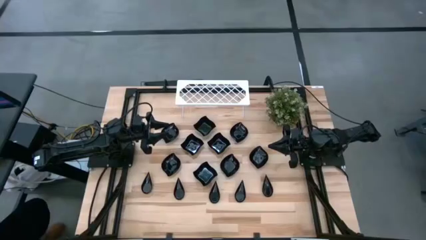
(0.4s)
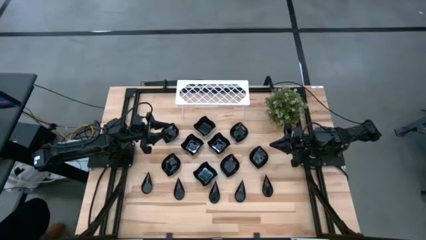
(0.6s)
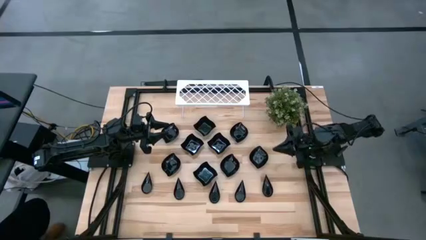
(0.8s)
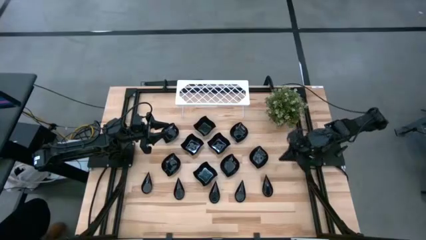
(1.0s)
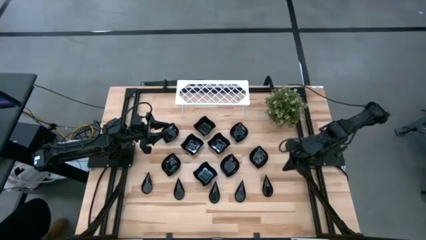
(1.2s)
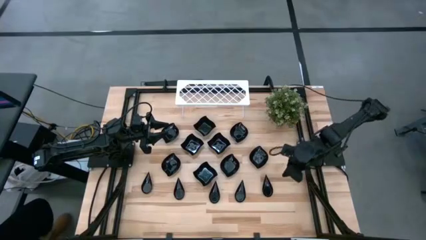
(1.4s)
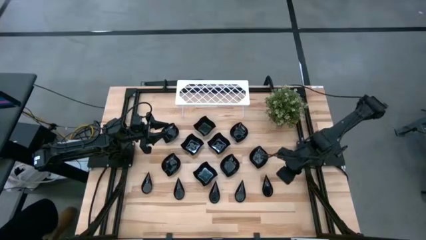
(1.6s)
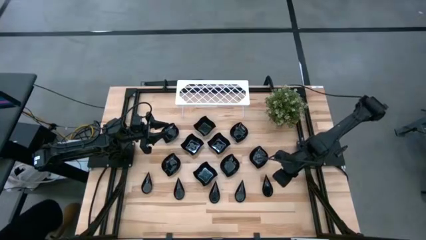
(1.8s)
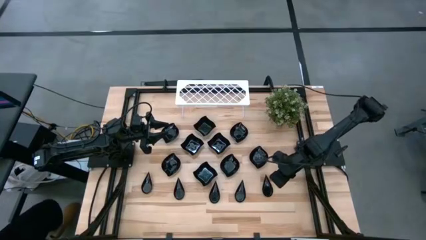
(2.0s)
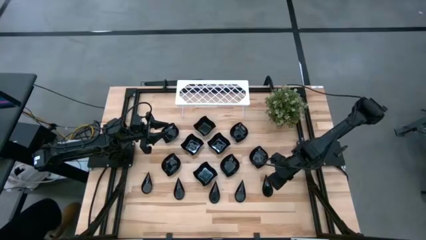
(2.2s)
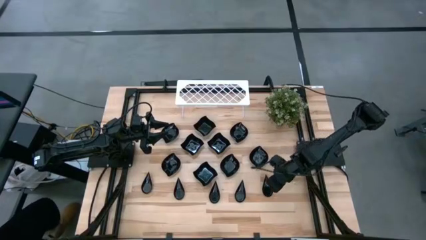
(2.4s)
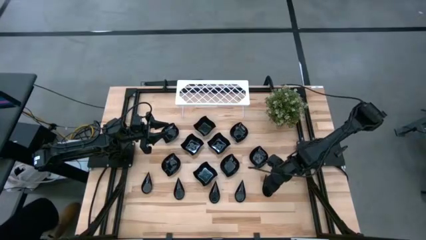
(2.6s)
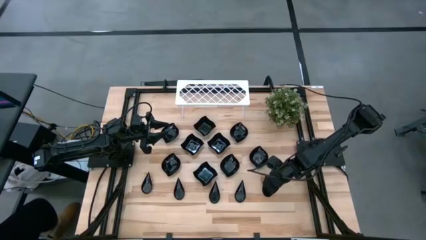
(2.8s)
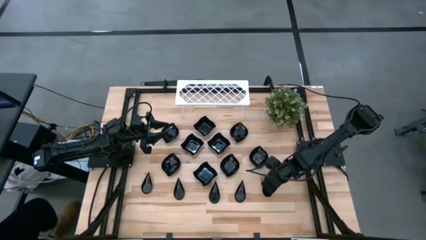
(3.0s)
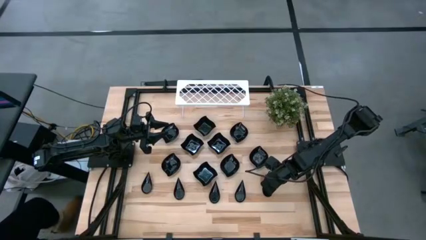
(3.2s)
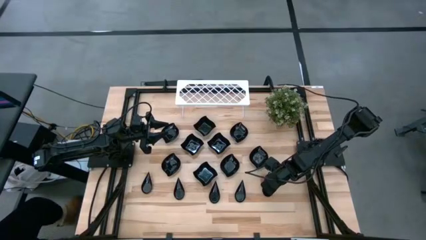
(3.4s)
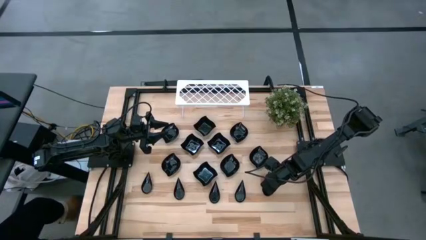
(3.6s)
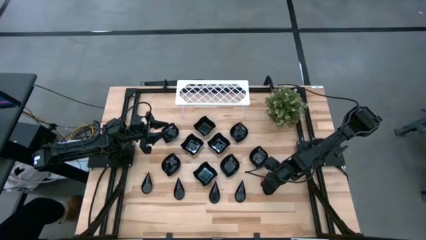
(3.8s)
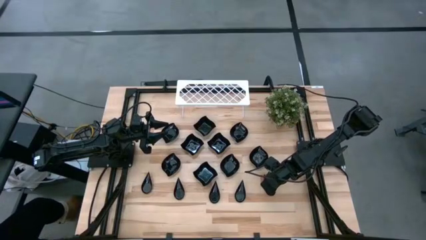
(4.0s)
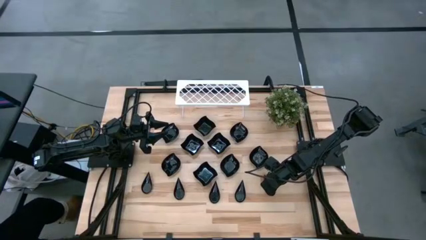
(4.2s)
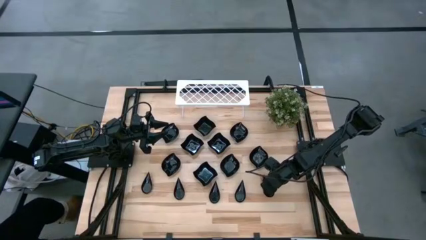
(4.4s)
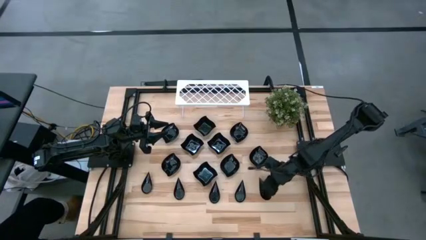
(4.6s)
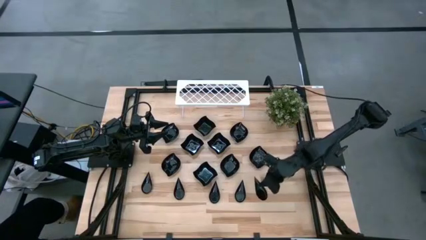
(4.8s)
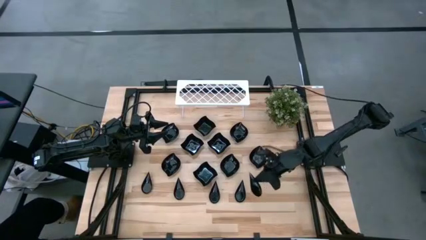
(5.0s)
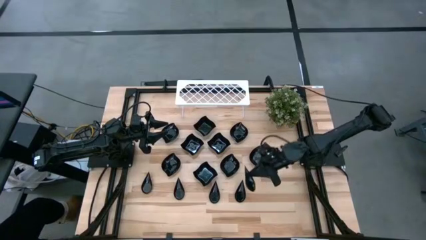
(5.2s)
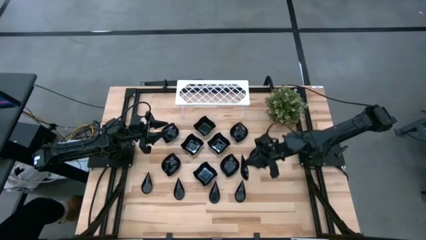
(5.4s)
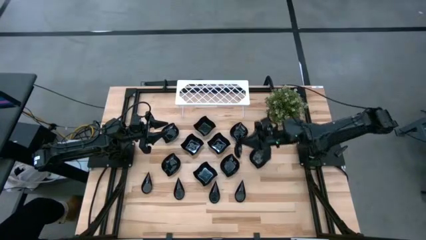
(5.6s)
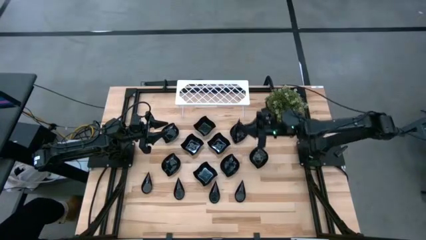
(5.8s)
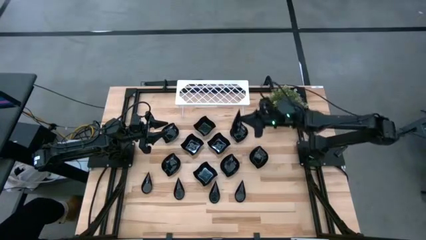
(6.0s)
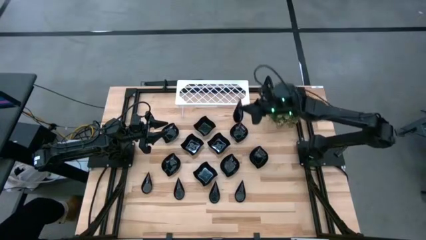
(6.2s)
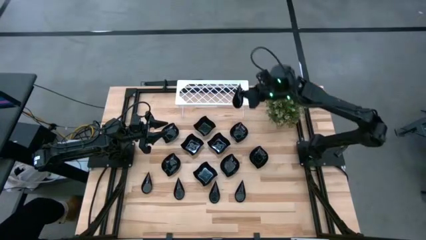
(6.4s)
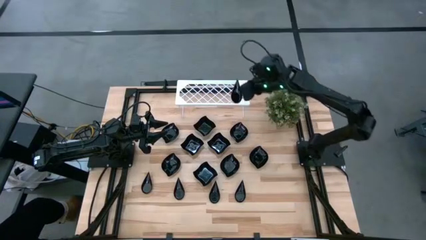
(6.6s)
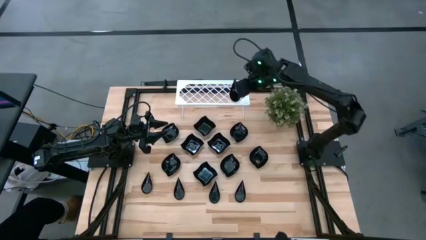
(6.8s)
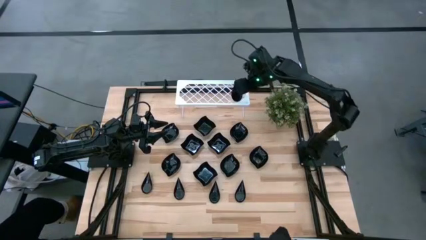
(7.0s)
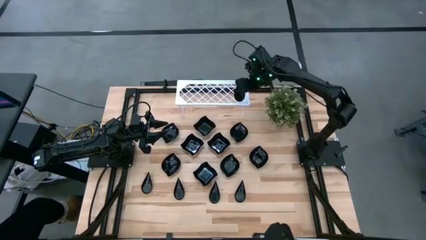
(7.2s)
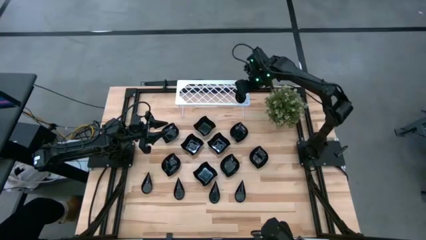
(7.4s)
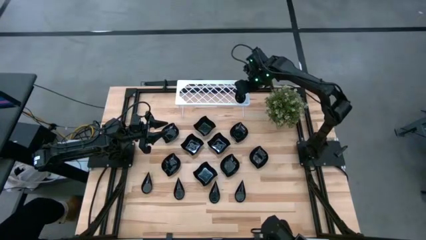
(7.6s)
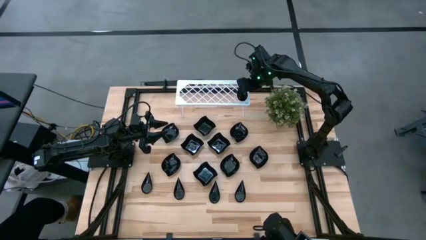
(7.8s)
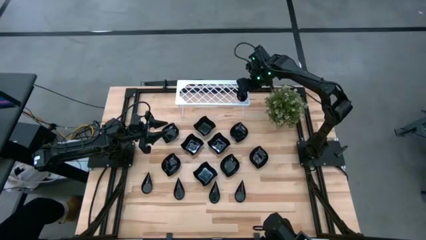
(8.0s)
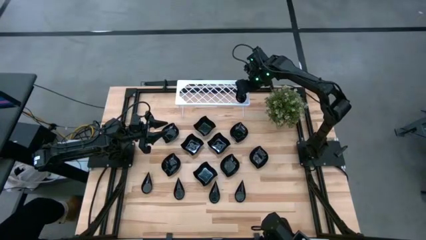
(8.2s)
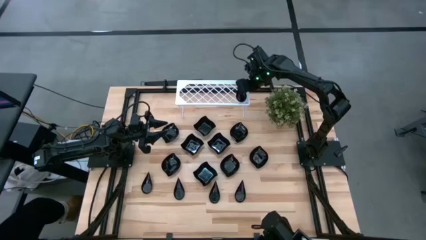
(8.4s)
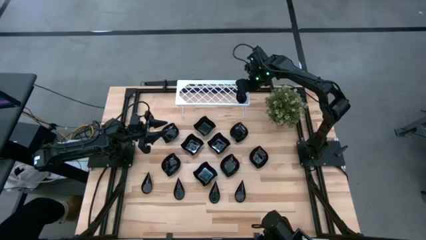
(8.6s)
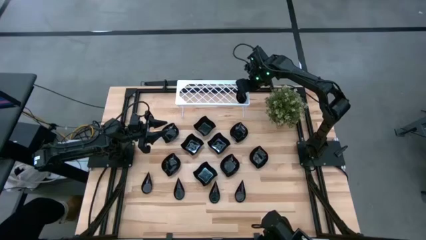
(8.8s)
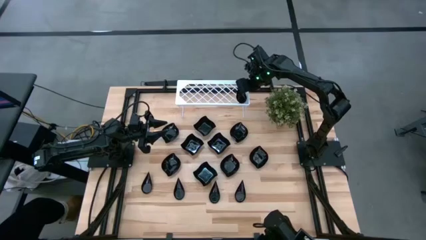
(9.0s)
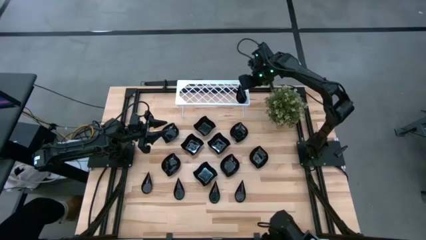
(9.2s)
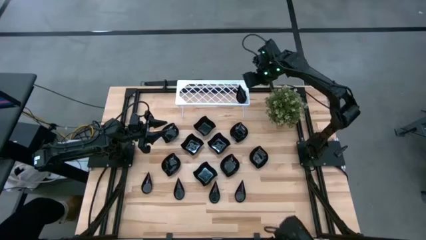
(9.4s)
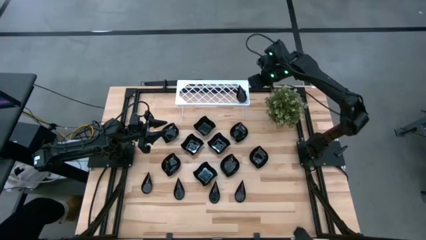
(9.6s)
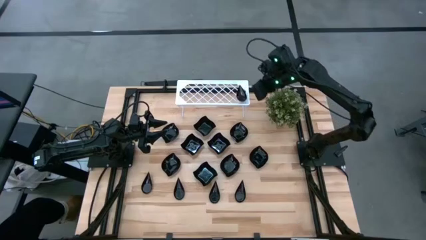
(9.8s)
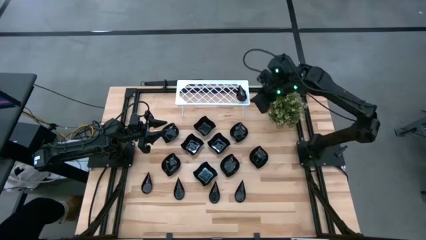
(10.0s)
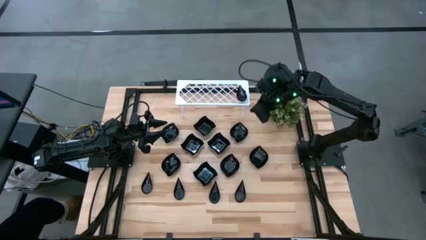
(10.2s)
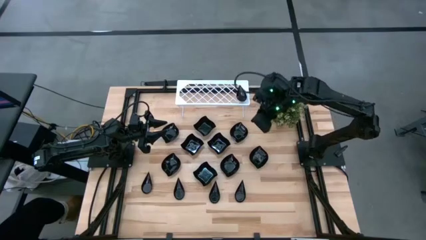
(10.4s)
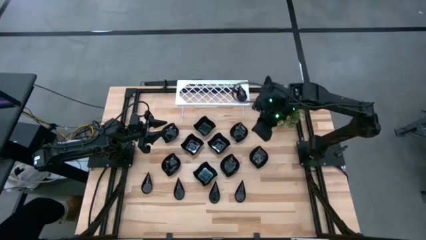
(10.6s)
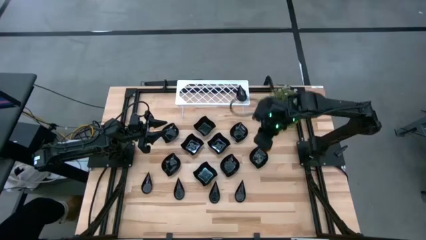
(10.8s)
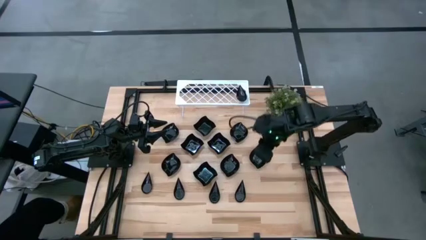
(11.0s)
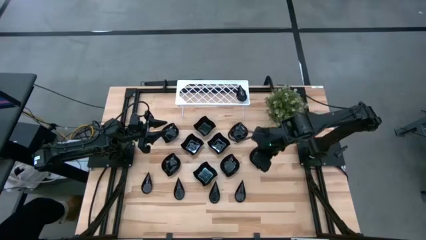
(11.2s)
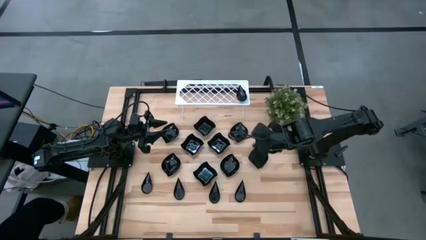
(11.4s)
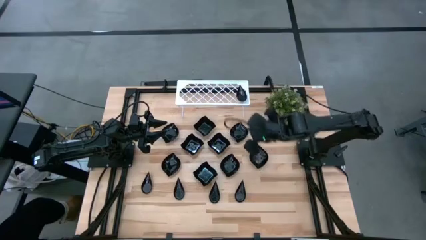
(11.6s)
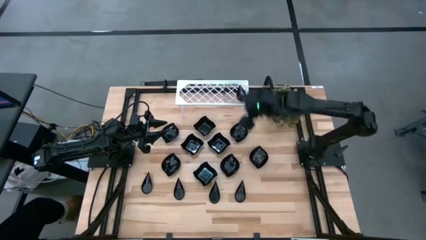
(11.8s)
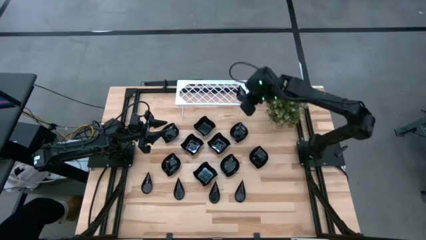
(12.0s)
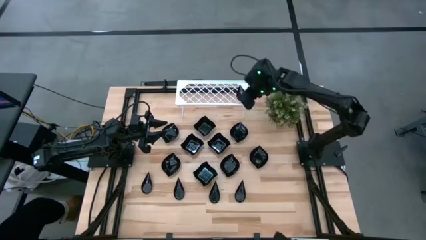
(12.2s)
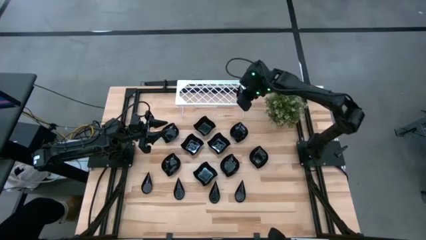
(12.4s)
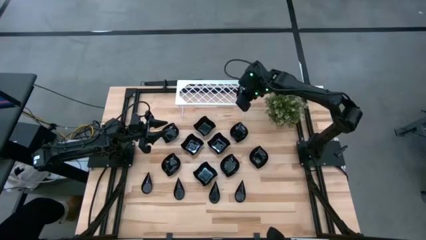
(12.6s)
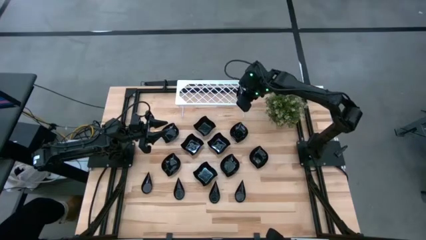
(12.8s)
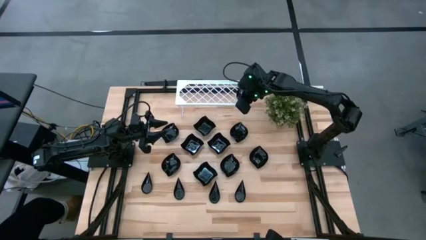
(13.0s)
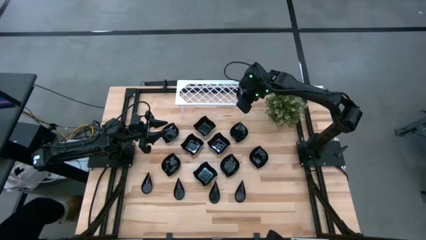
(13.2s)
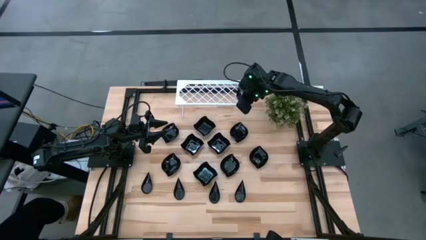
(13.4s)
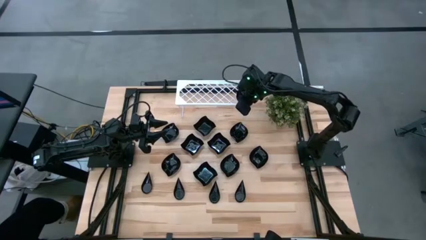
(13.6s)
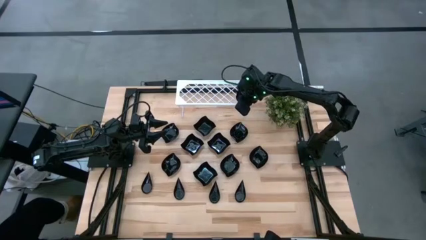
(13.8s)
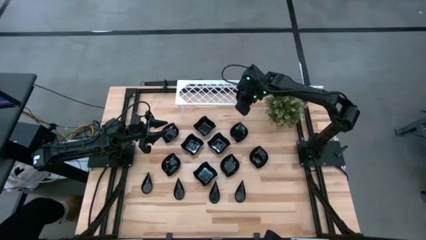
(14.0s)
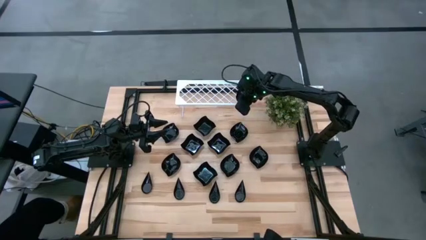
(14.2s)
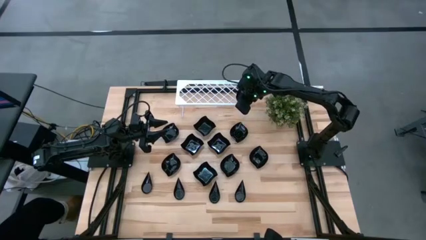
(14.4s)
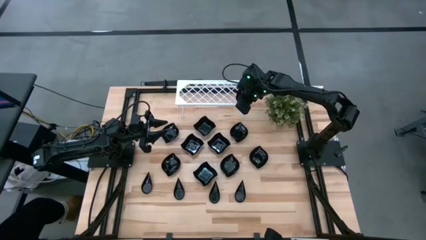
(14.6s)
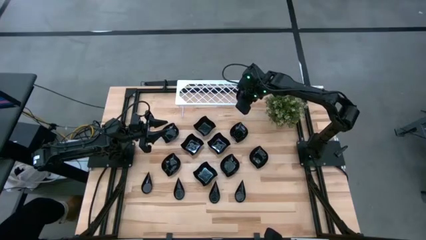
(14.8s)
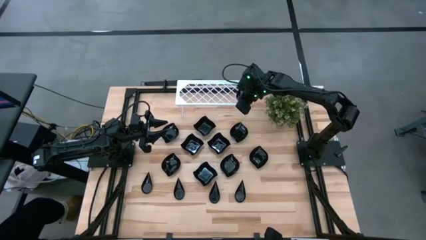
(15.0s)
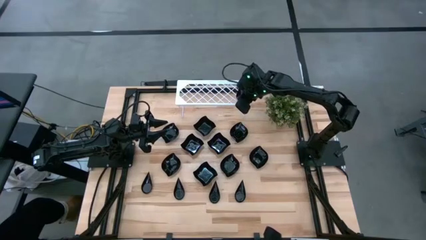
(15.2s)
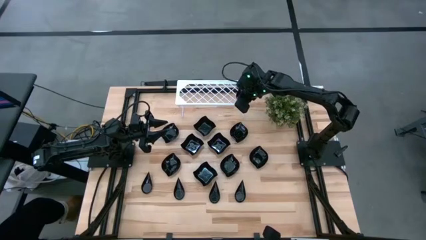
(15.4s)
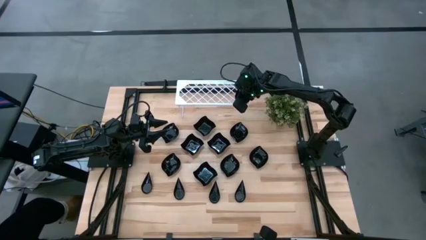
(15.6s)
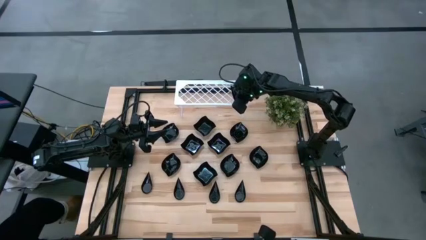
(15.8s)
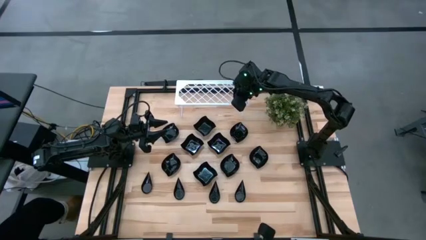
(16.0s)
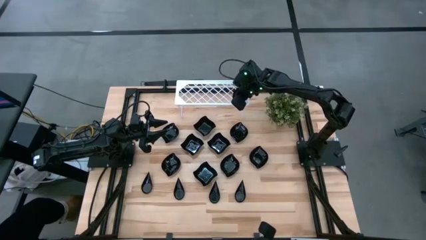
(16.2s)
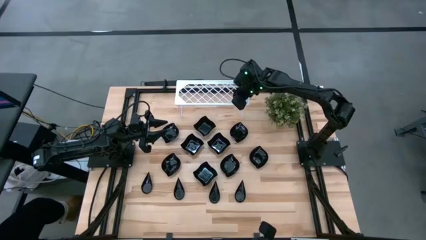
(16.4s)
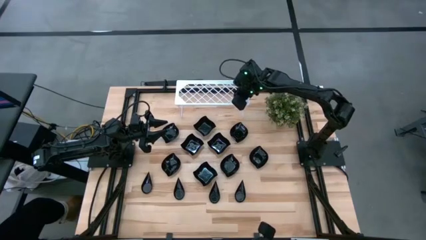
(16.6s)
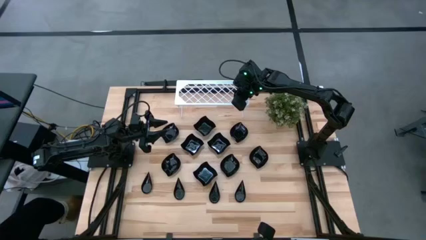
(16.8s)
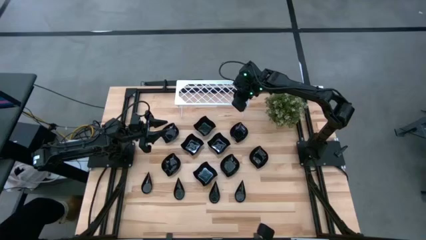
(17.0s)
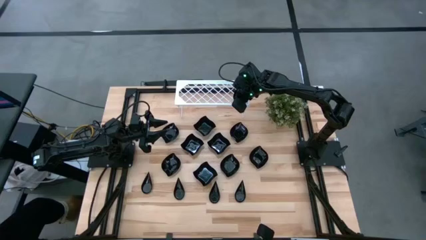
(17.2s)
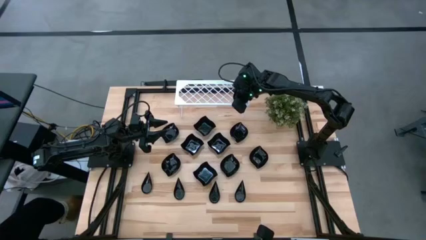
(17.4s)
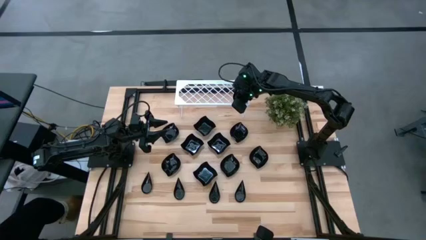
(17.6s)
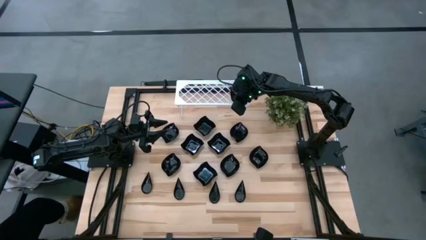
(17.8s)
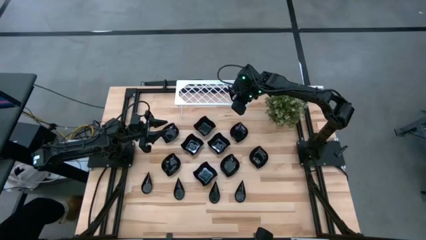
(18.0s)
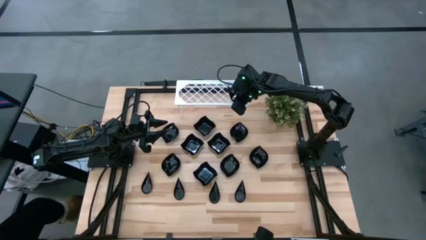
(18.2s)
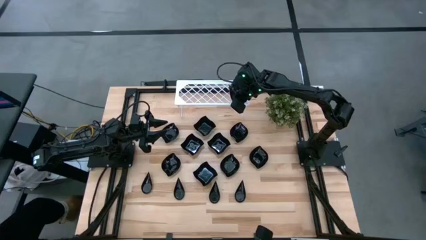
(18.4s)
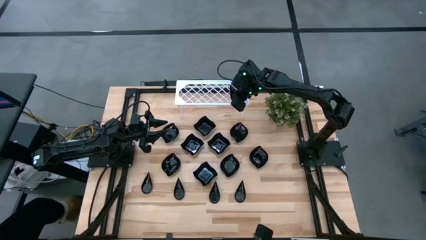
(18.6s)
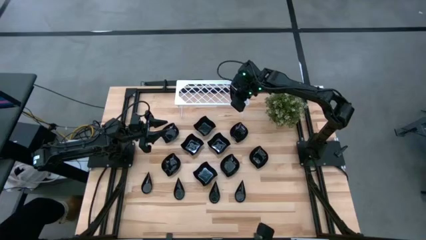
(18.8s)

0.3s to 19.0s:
Task: Pick & Place Mini shaped plates
Put the drop-shaped plate on the shelf
